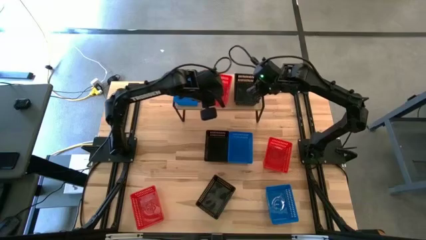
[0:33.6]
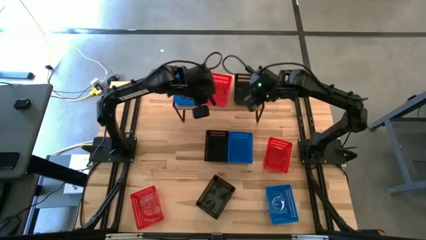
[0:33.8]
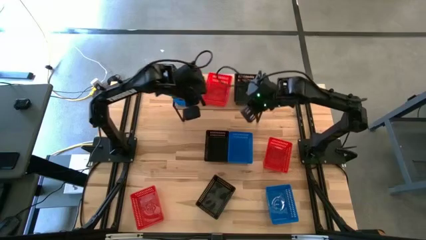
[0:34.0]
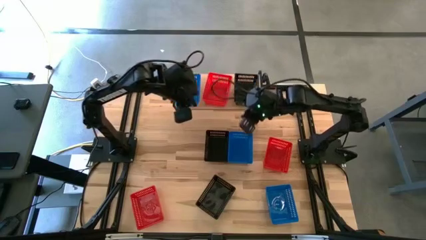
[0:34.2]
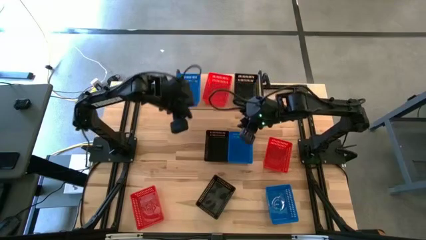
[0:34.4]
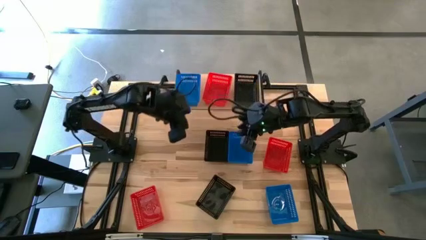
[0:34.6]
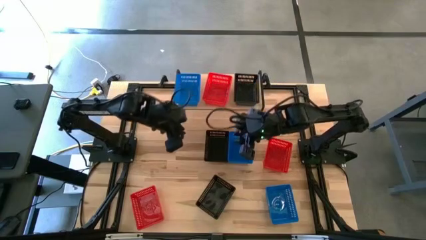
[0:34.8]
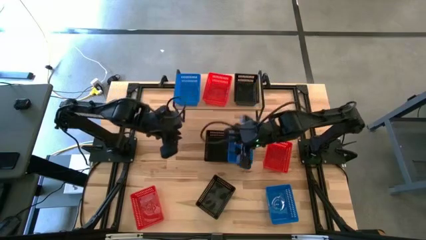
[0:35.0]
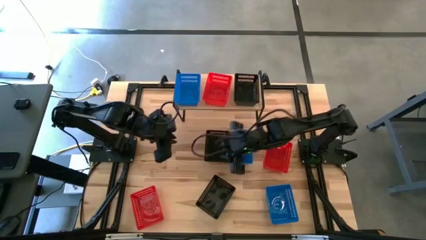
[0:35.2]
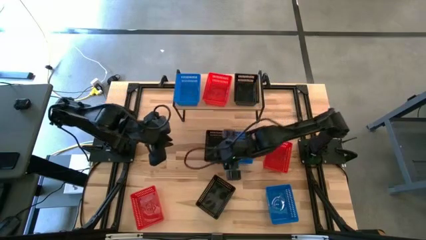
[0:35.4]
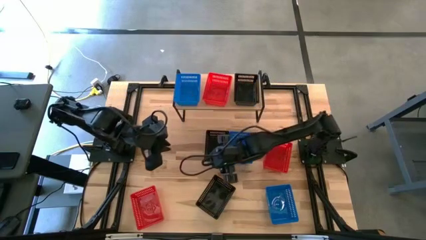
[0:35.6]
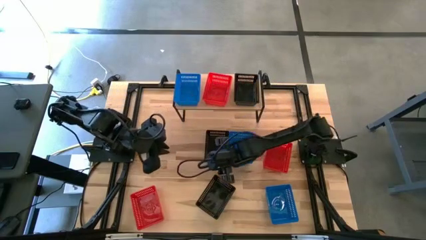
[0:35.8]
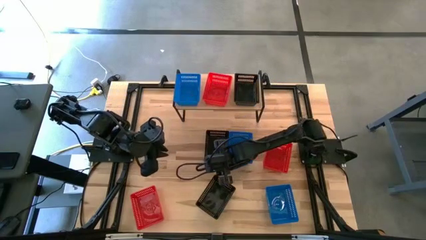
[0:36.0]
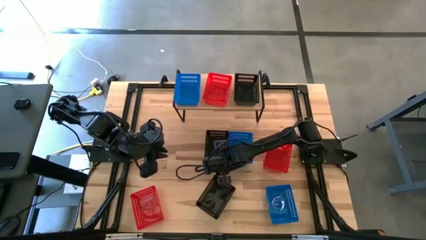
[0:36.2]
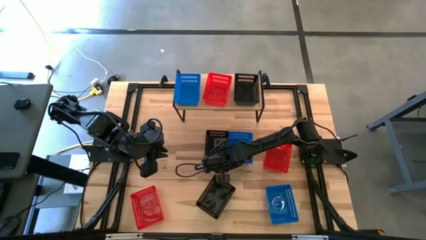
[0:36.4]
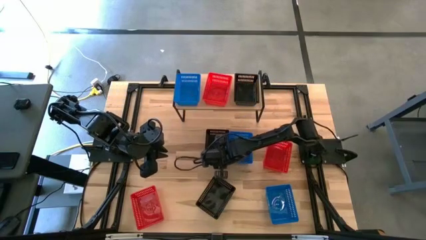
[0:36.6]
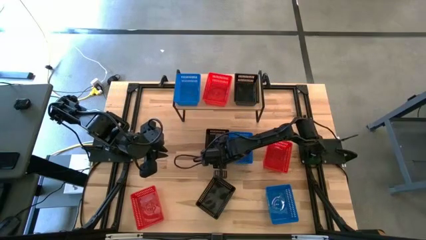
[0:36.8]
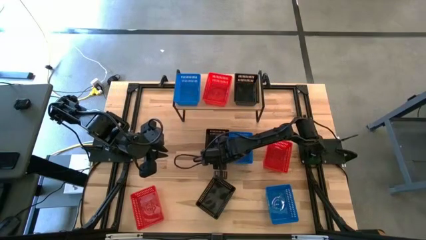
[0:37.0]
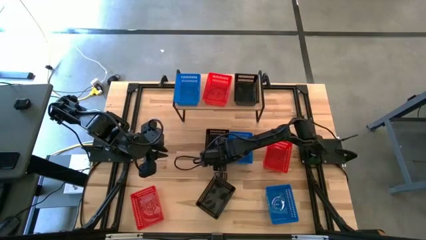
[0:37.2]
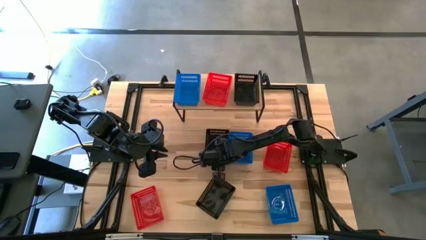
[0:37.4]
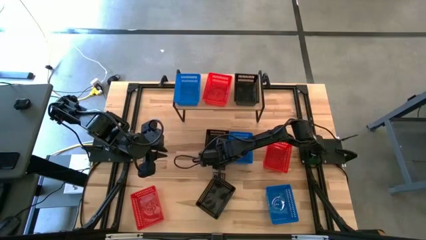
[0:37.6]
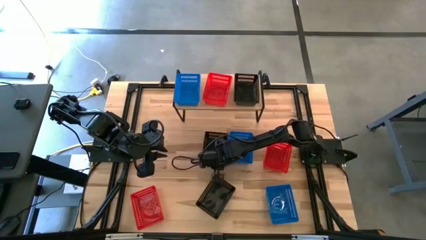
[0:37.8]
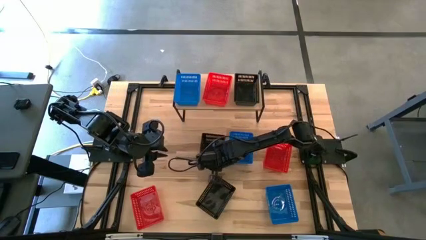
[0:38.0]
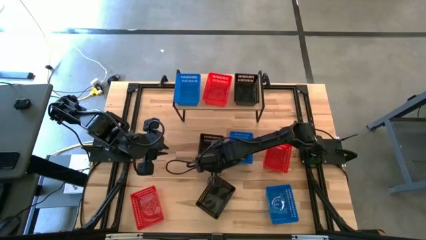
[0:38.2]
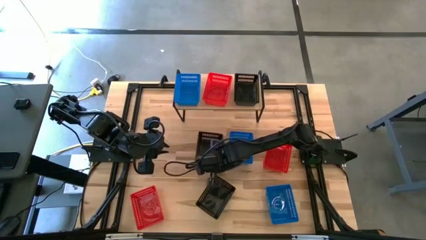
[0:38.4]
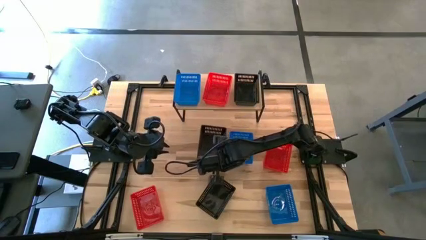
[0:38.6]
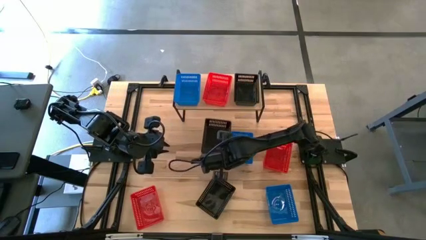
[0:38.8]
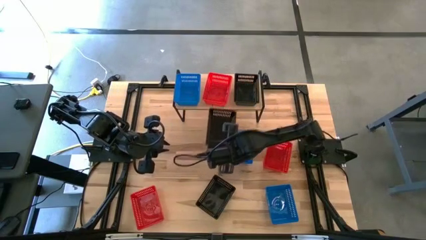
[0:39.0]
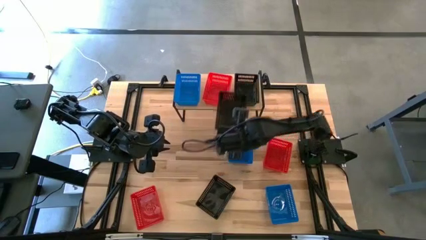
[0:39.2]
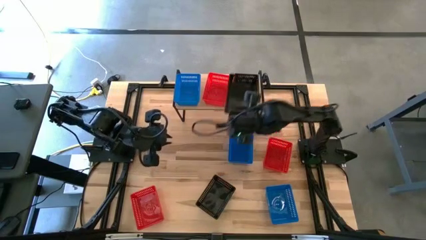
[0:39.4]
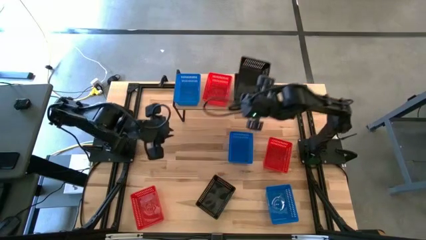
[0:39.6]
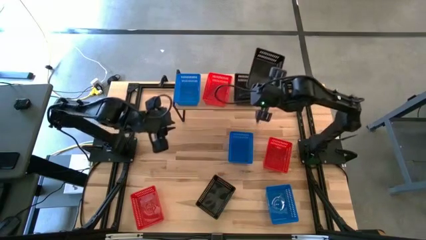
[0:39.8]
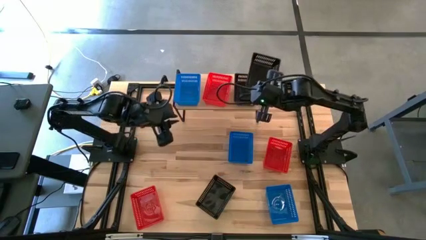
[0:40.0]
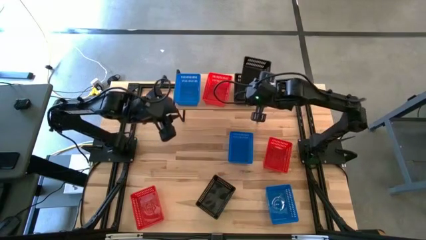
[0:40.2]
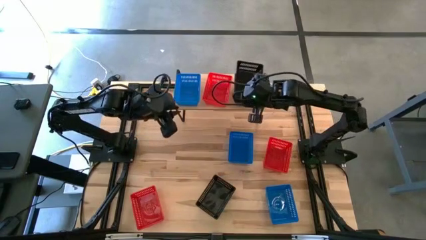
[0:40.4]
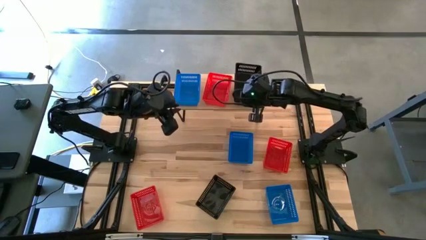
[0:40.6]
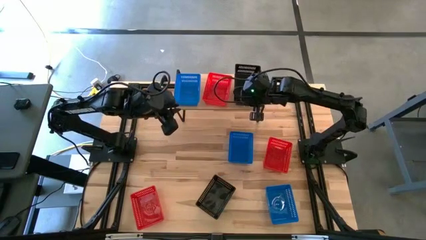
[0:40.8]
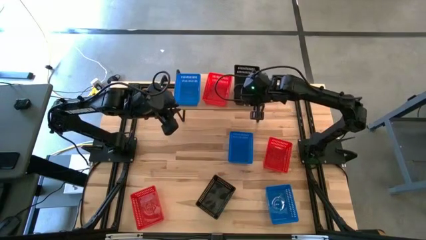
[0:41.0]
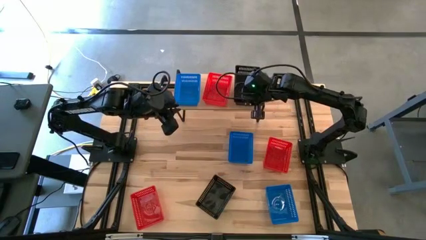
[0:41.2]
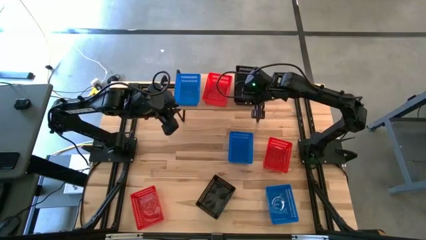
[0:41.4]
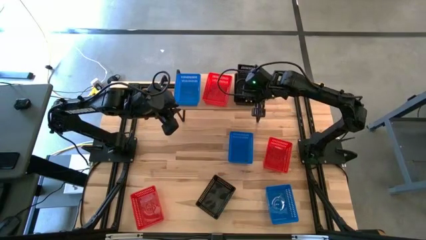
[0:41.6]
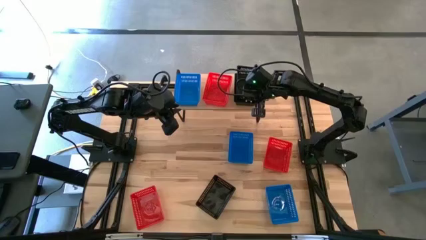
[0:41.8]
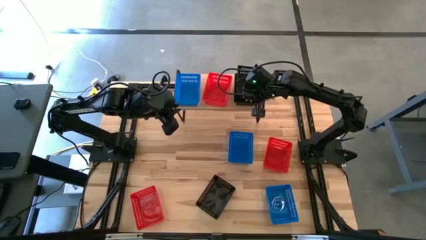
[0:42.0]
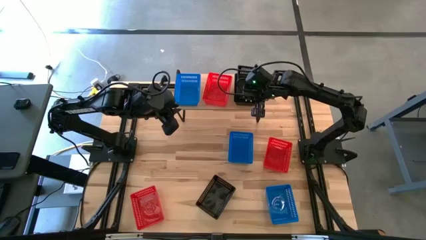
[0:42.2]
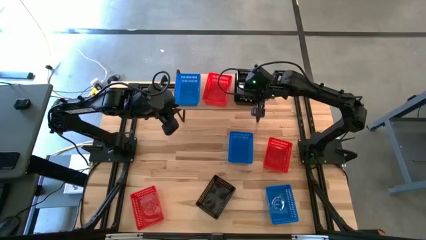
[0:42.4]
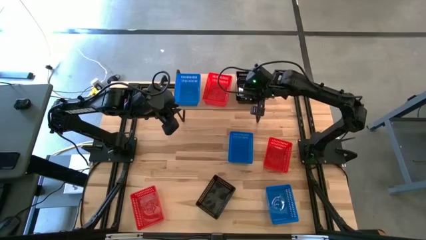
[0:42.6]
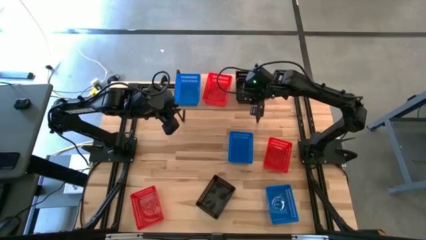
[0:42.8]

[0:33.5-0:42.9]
Task: Stack baskets on shelf by color
Stack the top black bin on top of the other black bin on the shelf

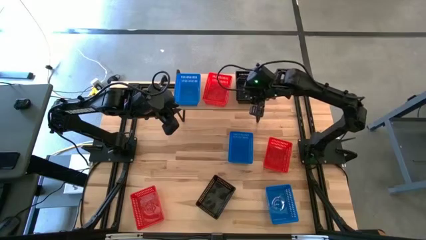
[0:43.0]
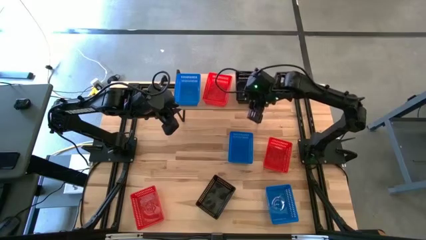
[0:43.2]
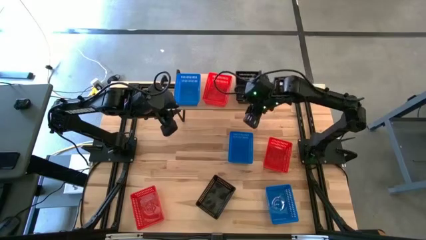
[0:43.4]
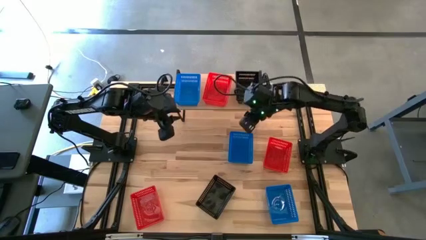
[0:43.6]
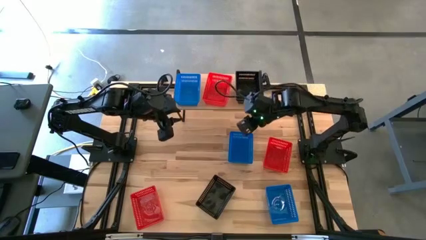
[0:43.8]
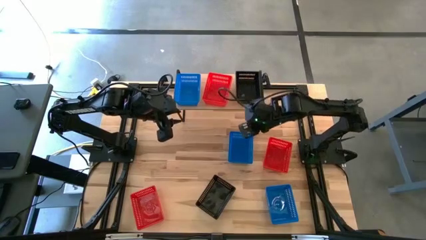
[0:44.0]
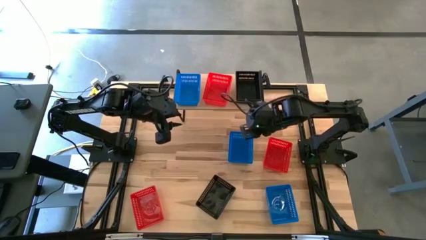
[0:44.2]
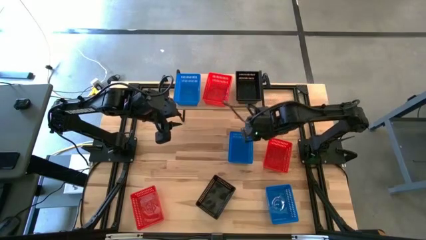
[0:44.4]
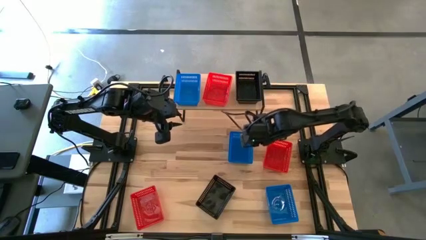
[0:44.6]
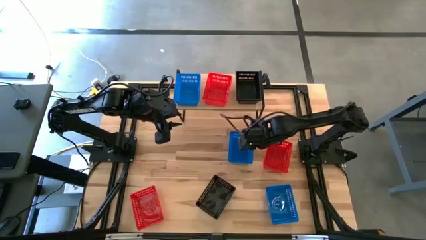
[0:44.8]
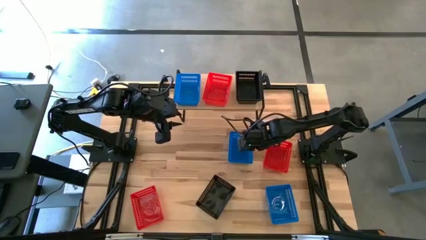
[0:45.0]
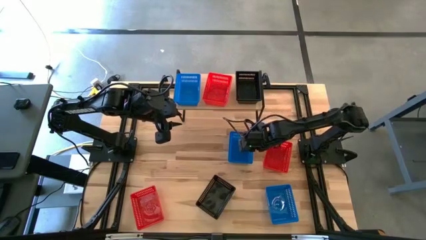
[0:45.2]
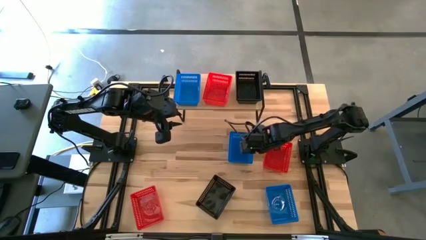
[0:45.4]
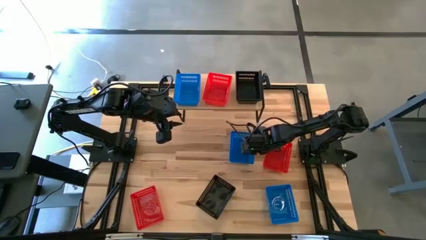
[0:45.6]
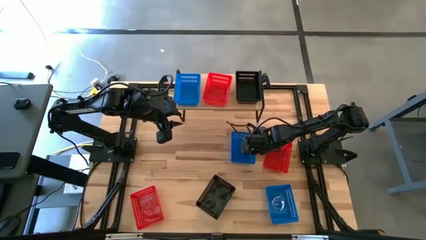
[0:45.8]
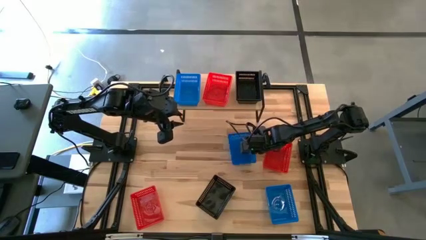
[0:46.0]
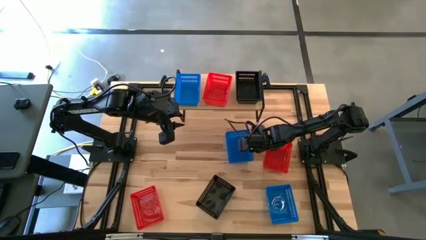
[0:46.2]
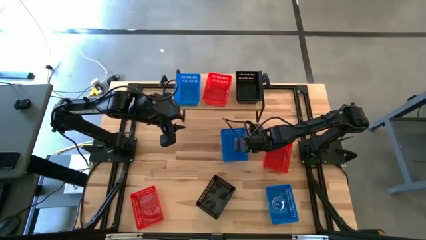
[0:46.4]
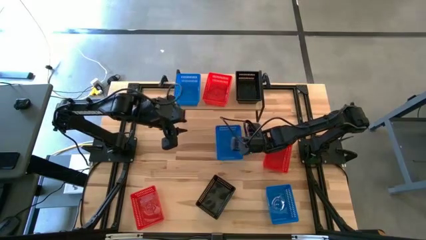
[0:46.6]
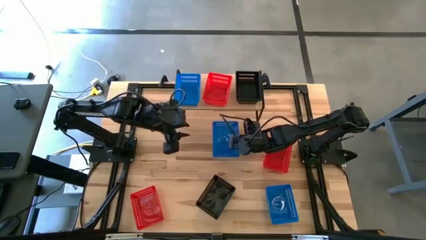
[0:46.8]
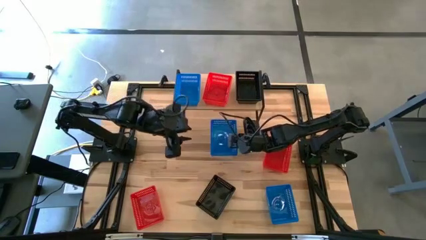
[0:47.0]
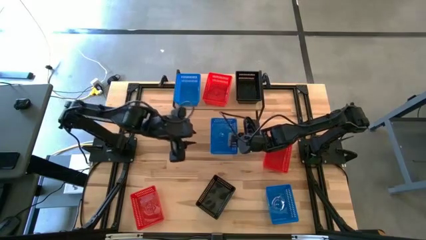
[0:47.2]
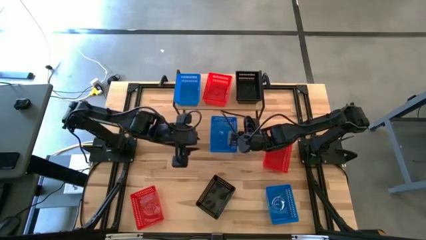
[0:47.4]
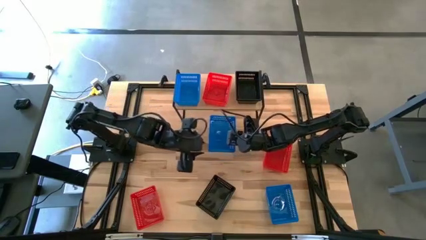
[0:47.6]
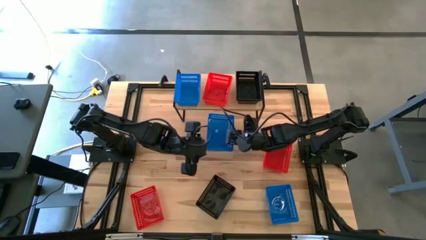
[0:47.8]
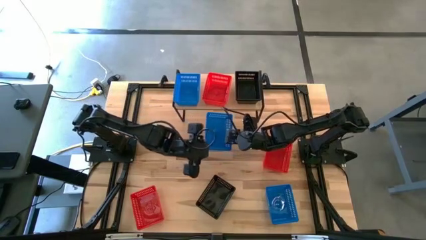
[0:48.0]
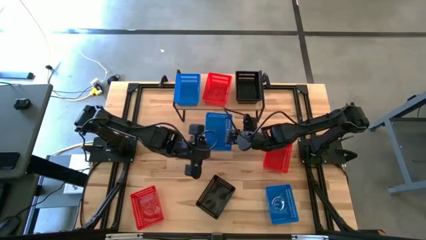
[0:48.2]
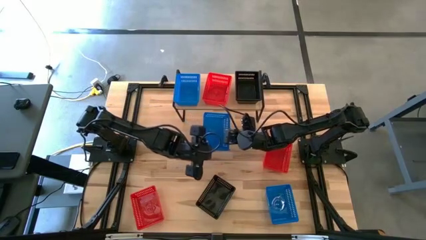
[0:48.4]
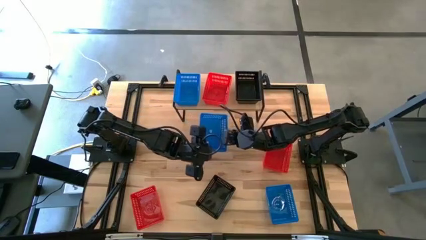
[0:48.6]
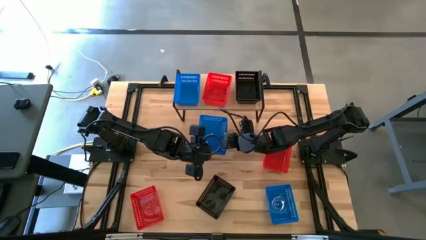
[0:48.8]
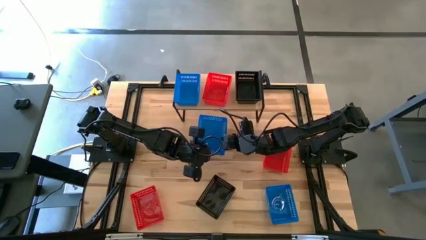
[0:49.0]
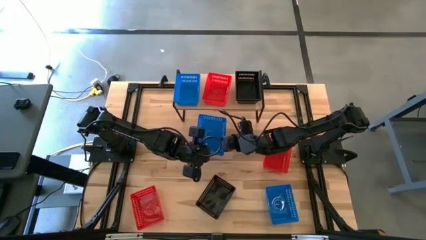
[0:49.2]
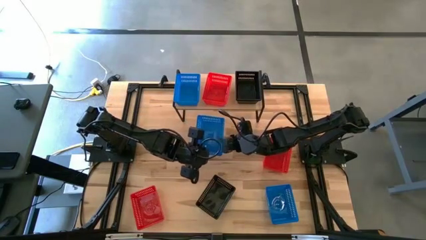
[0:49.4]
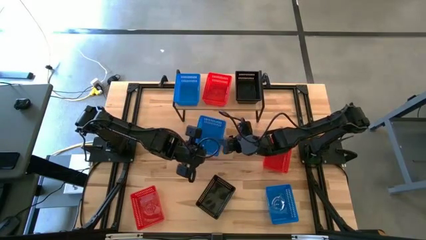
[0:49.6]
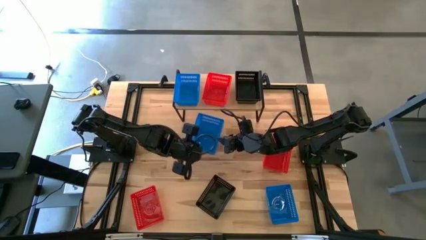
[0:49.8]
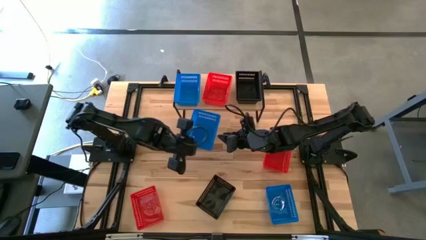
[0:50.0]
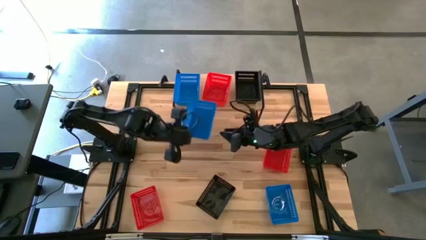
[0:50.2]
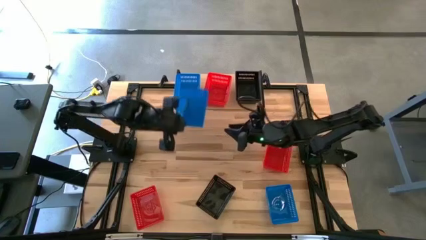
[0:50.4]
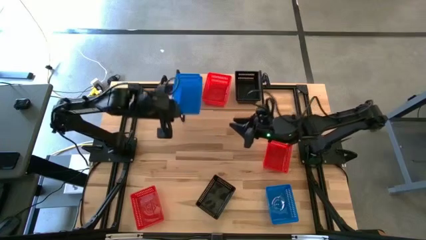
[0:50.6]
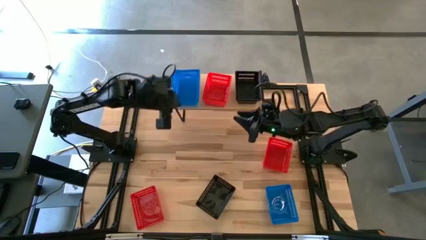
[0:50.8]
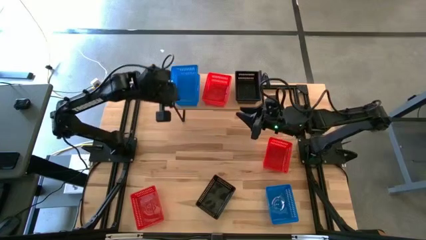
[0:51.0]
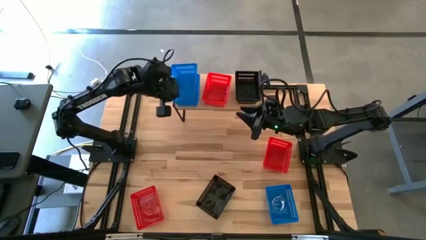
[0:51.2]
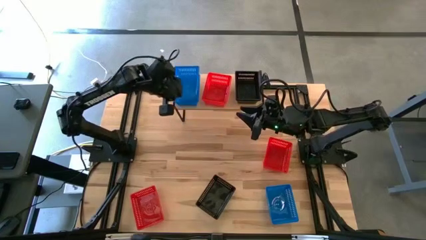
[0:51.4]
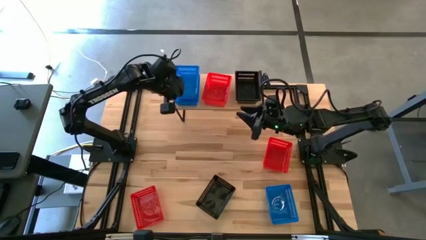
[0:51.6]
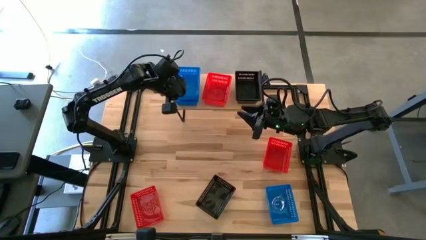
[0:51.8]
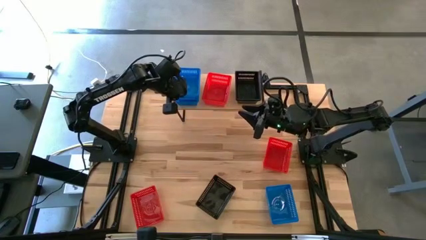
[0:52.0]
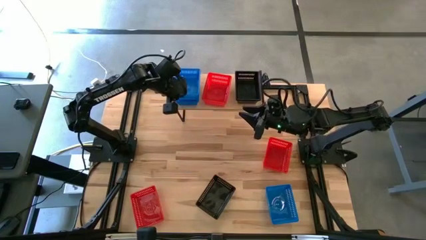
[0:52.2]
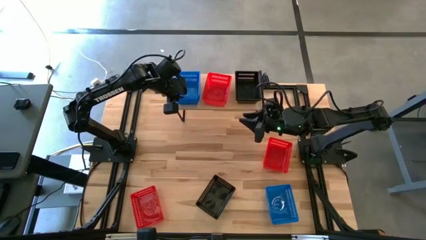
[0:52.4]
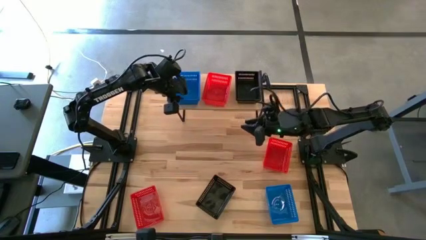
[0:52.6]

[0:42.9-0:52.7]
Stack the top blue bin on top of the other blue bin on the shelf
